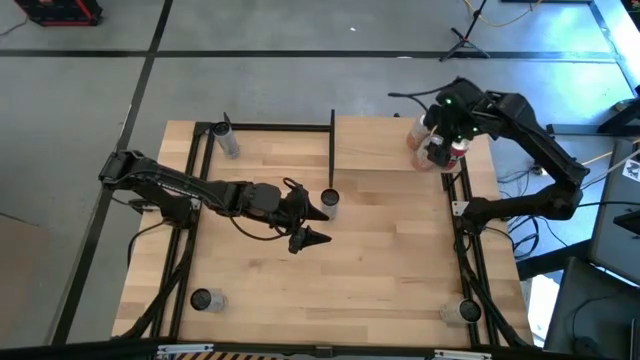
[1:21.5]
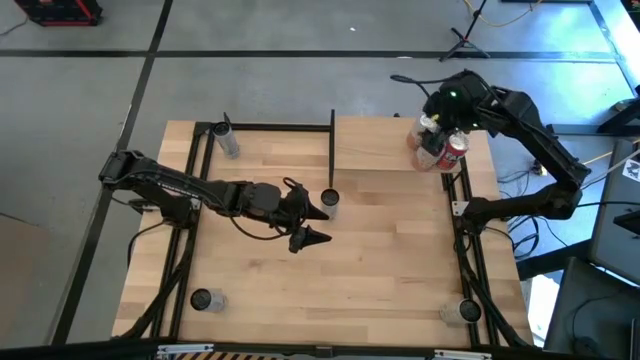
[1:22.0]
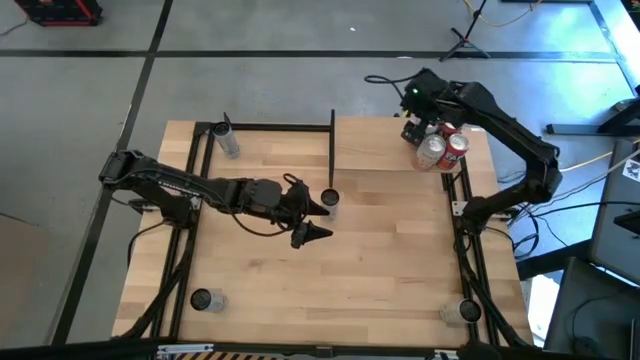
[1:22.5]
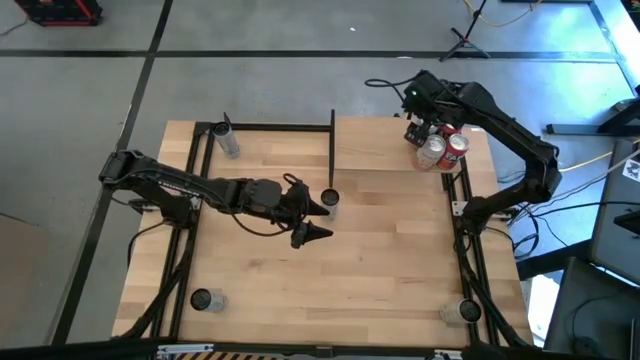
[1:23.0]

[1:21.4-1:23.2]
Task: Place canned beverage on shelf
Adjust the orange soda can on the shelf

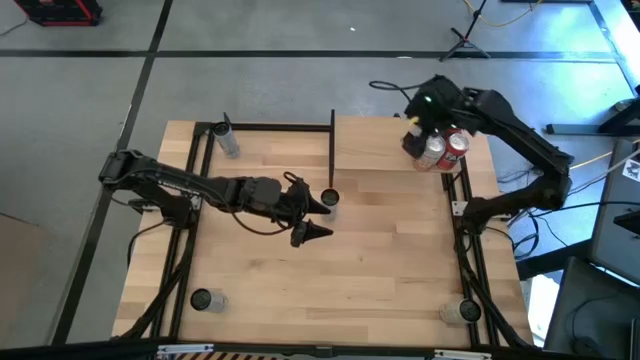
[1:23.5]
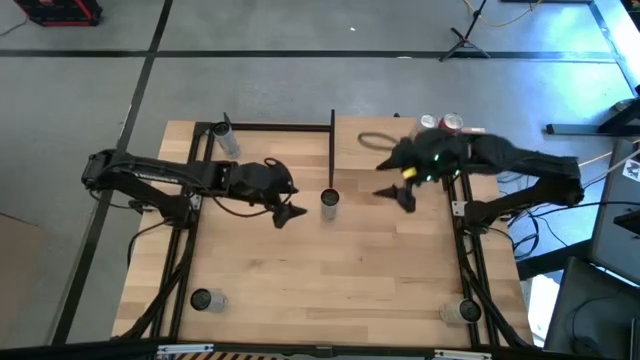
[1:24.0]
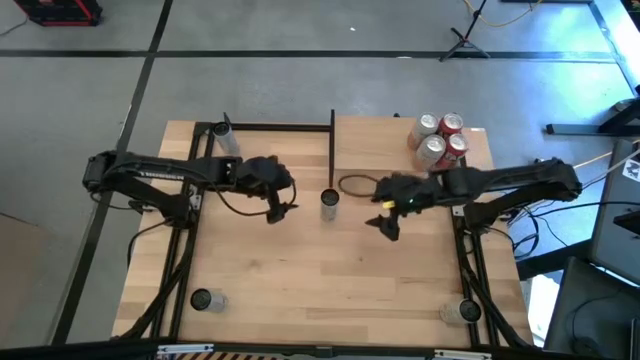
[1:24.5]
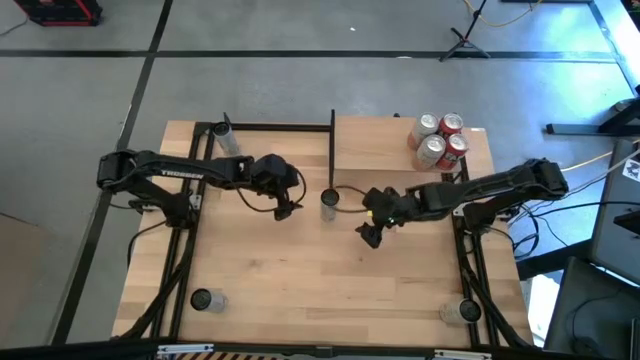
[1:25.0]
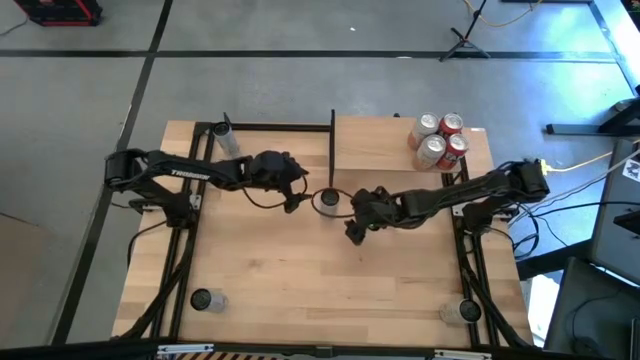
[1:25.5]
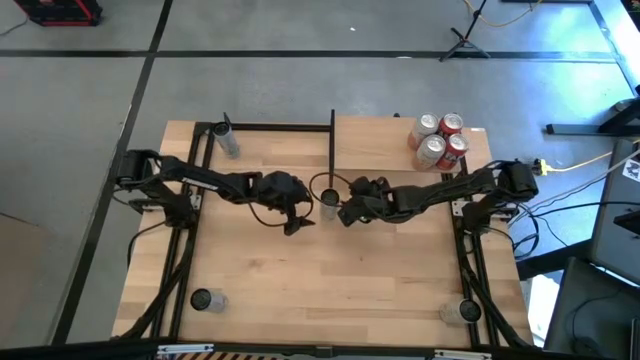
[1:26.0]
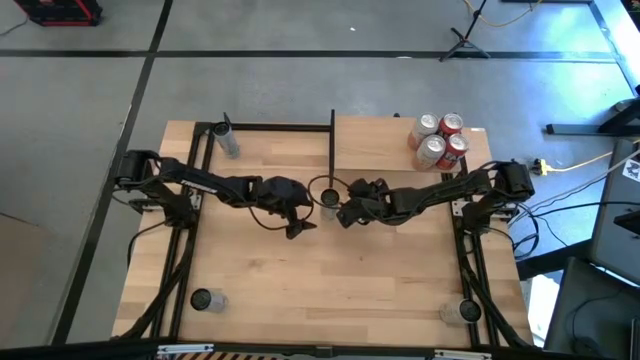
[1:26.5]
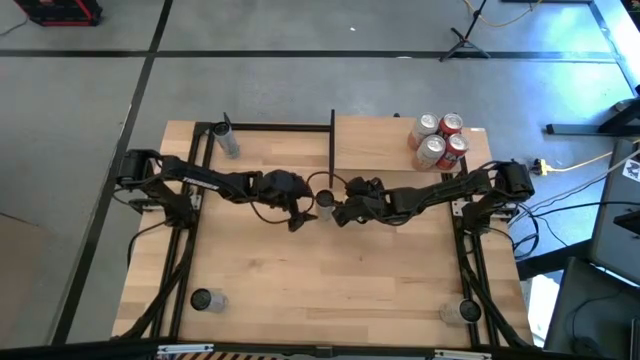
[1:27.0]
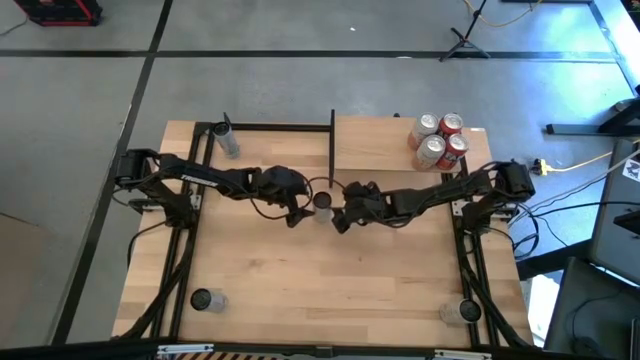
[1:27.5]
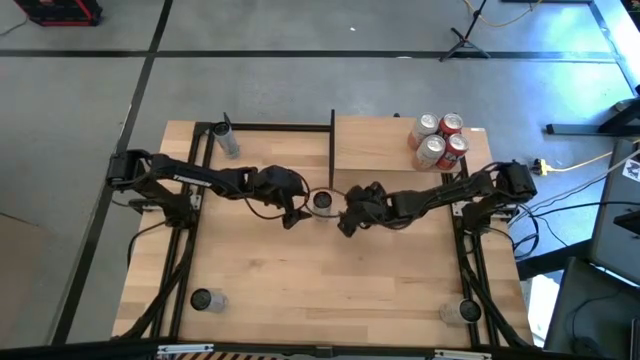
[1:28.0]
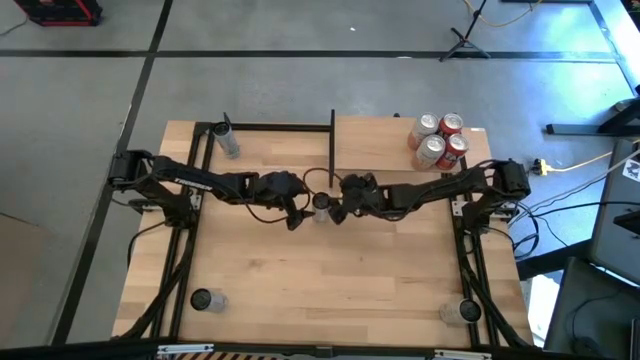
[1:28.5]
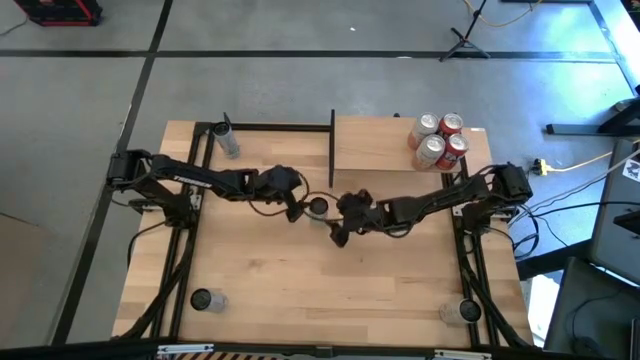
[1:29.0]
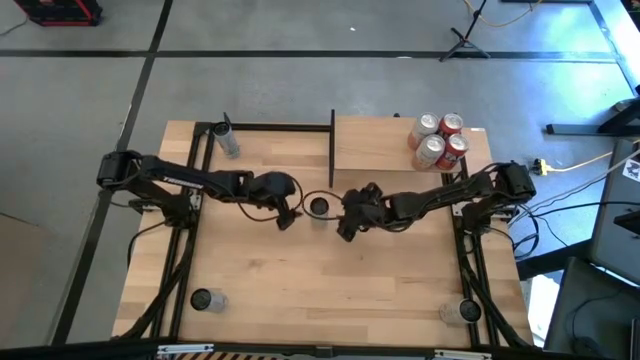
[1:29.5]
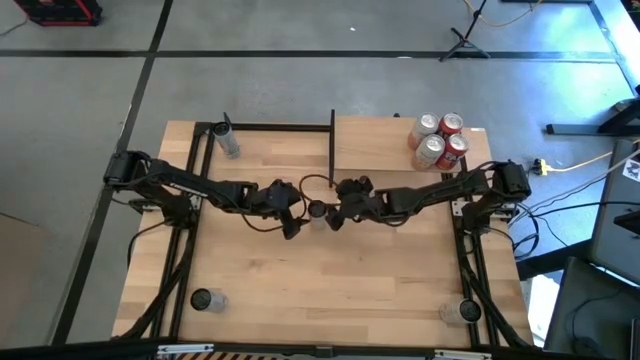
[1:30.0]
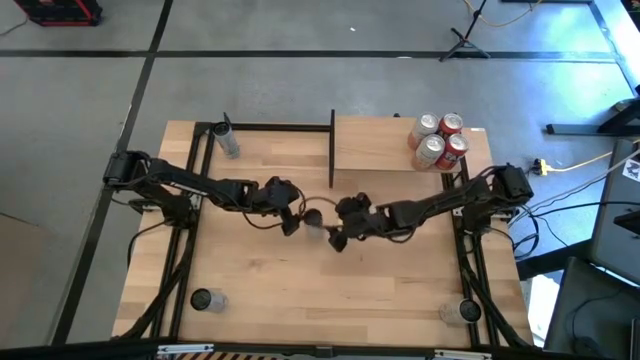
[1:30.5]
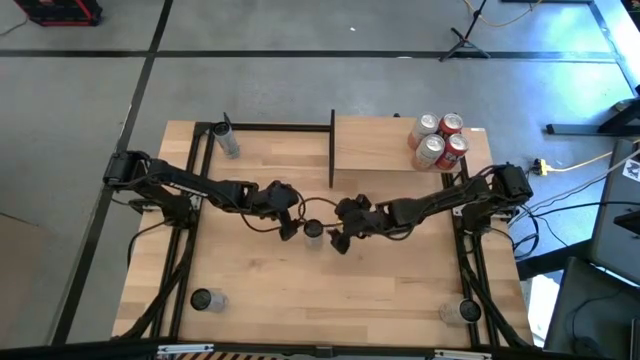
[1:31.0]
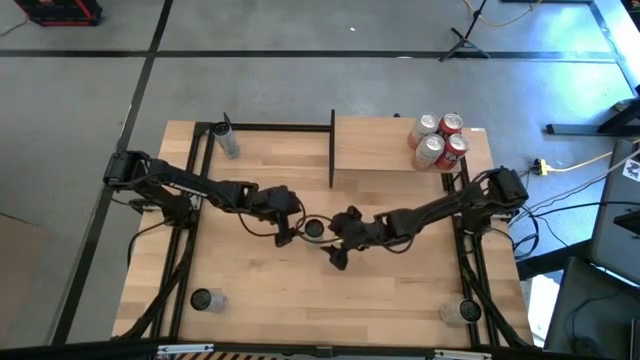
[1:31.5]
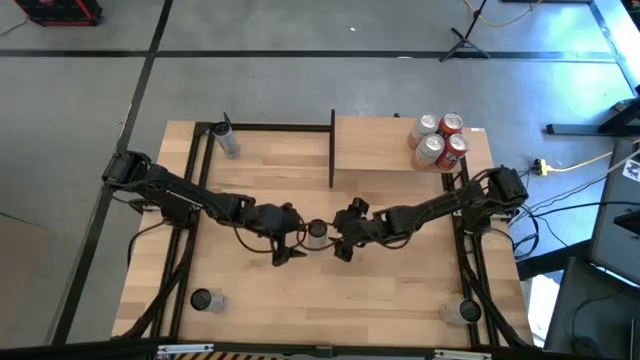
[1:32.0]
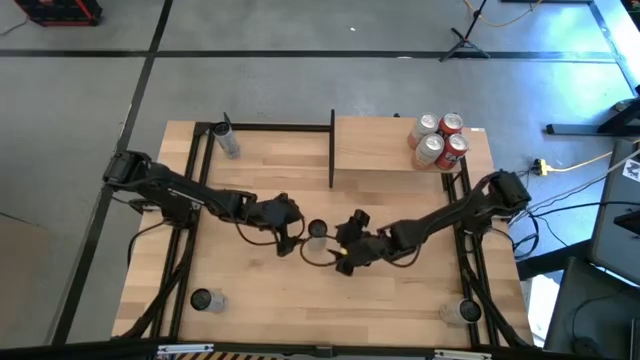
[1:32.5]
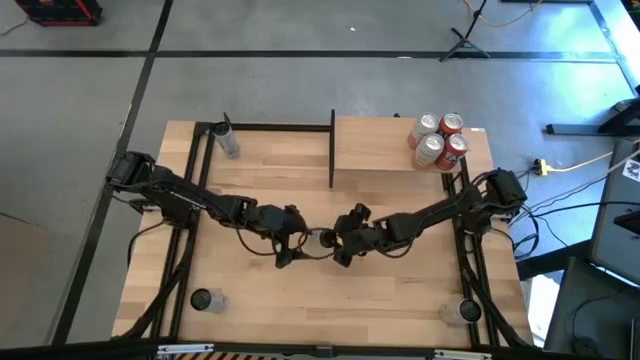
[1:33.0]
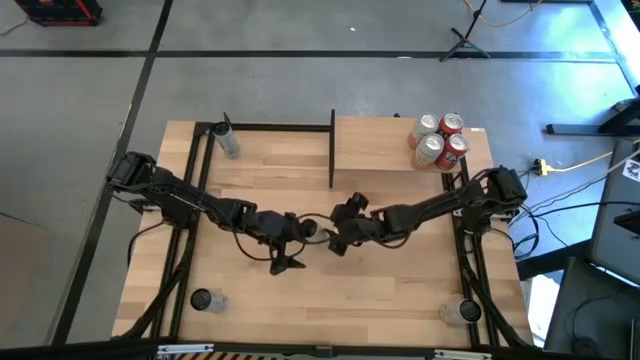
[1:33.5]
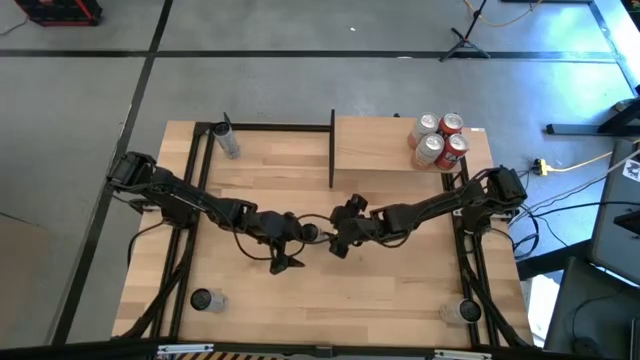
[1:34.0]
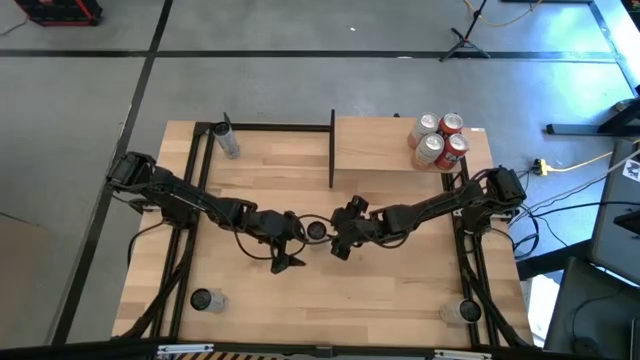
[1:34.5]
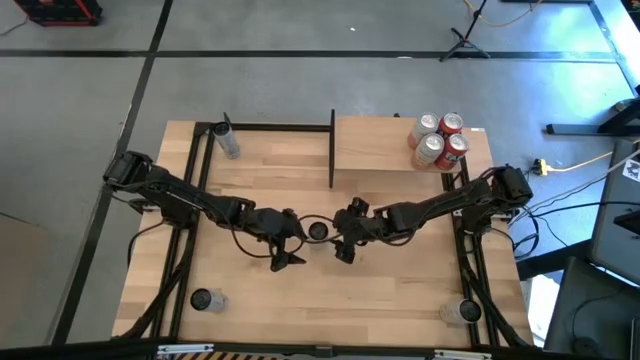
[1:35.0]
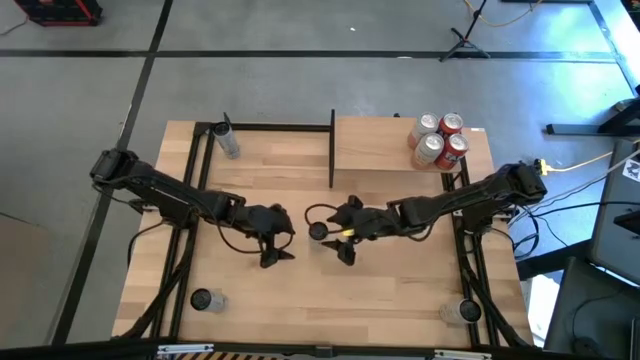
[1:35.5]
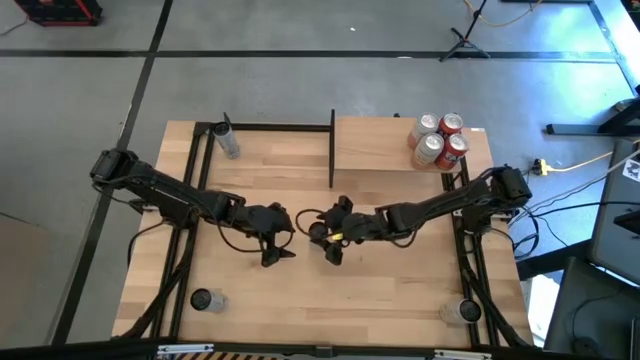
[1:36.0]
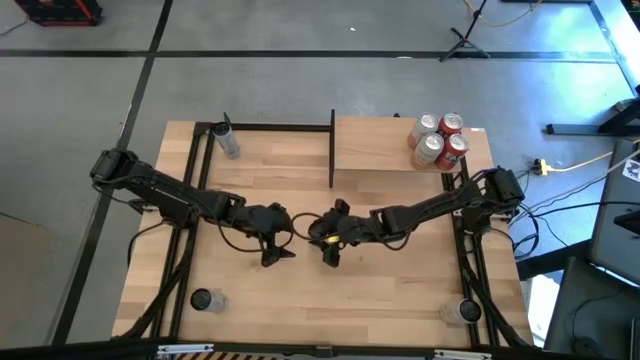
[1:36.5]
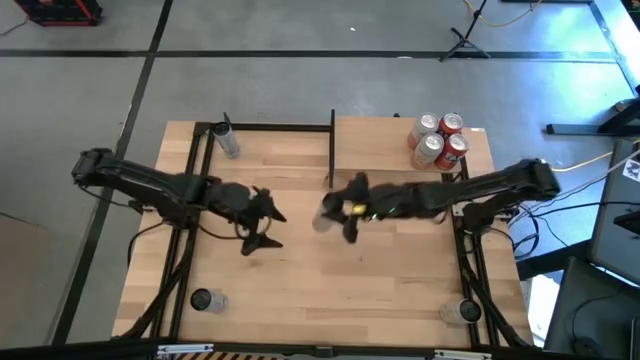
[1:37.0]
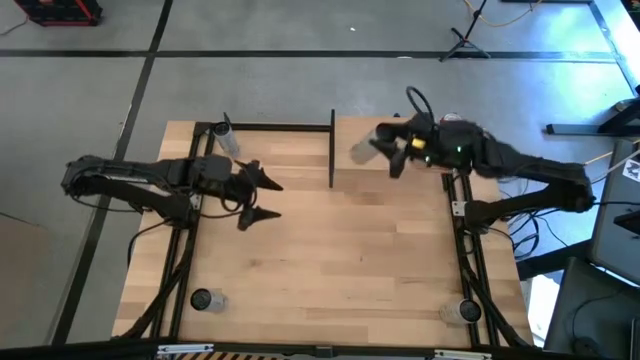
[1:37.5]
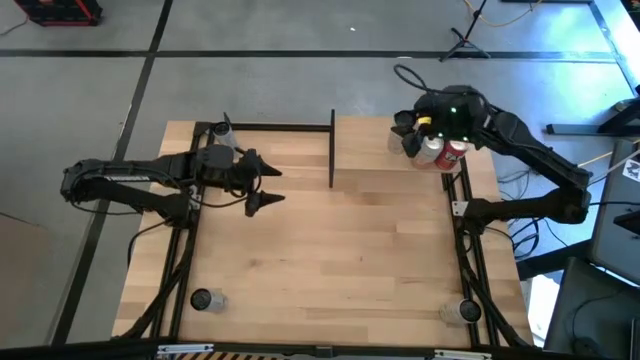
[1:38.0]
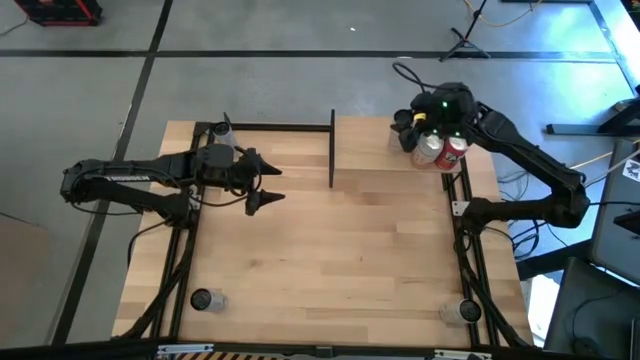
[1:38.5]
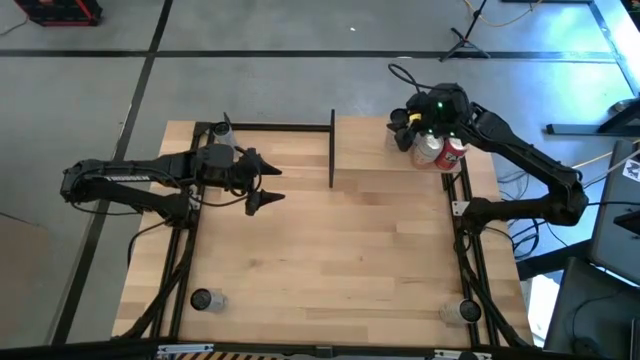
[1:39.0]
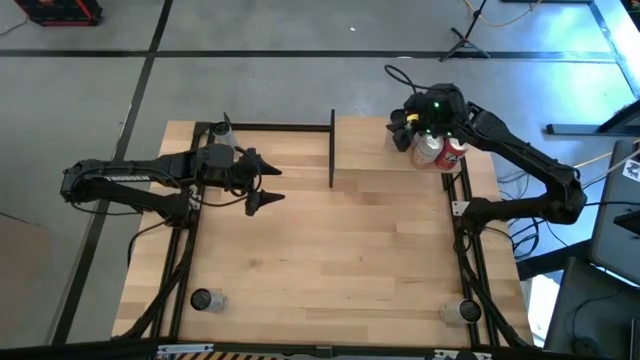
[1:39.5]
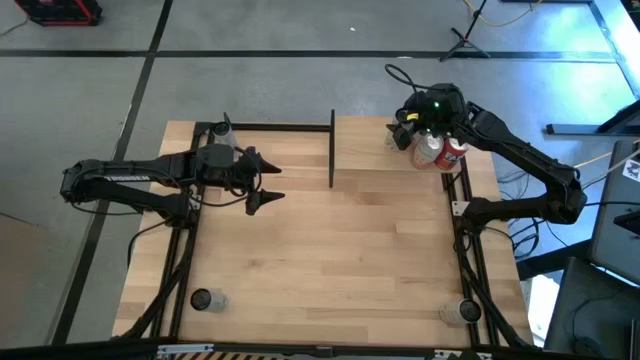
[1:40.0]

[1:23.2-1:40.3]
Put the top white yellow soda can on the shelf

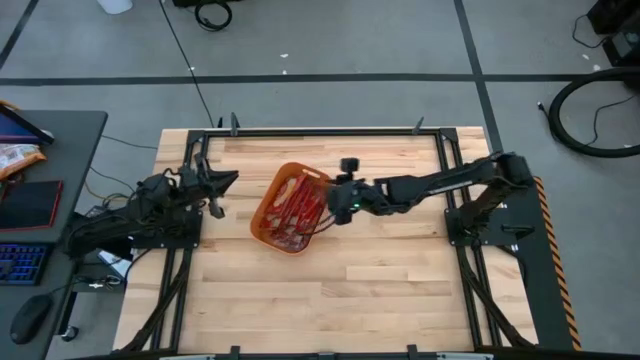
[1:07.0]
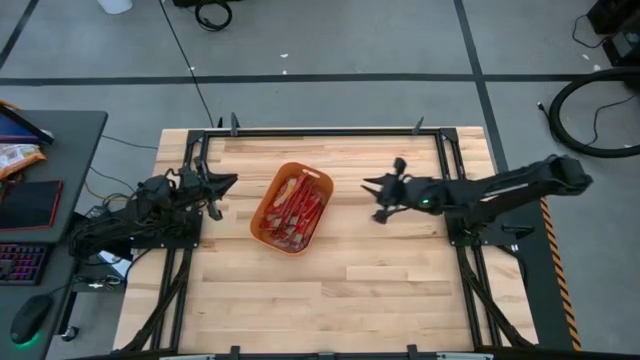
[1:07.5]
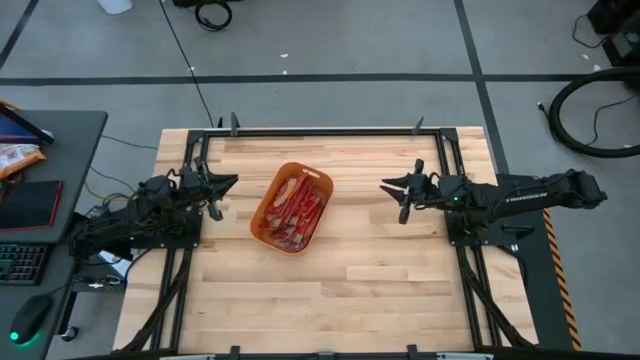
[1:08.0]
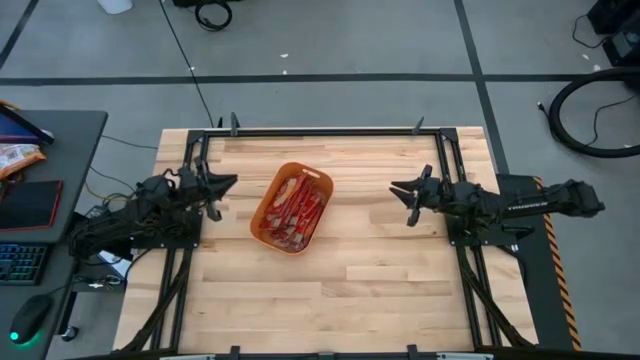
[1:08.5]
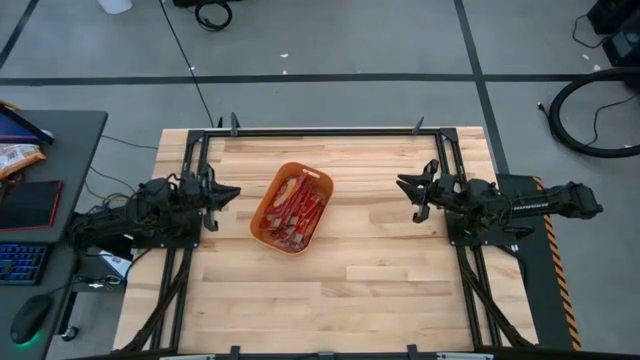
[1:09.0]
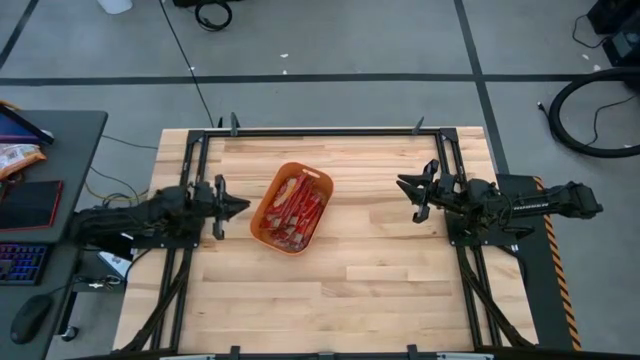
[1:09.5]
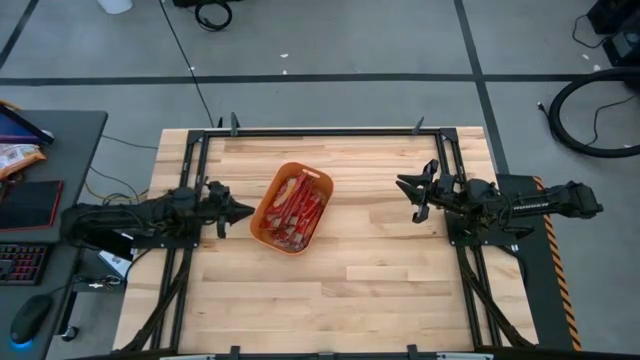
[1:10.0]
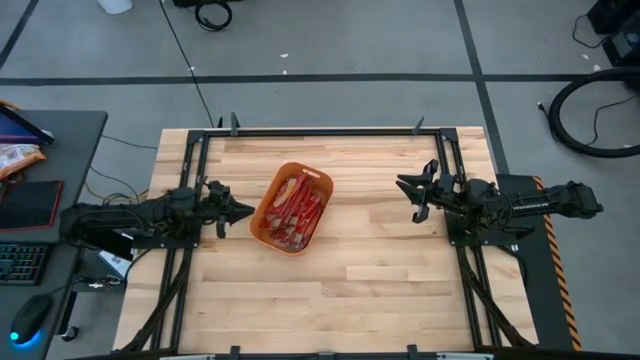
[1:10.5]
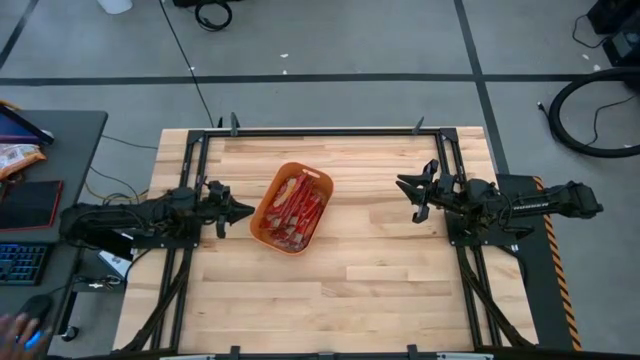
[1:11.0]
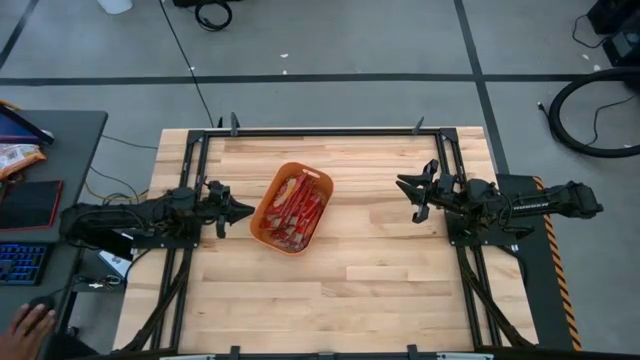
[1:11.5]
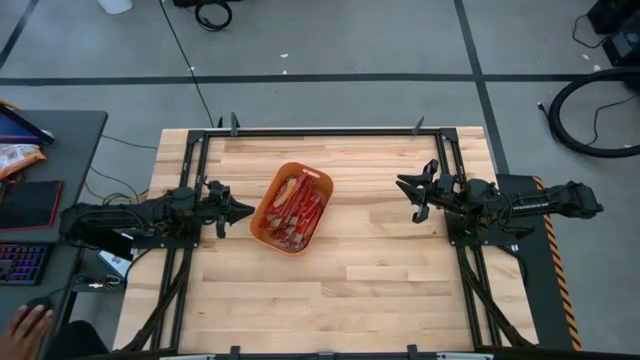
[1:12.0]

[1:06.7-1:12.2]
Task: Sort popcorn bags into baskets
Return to Home Position
